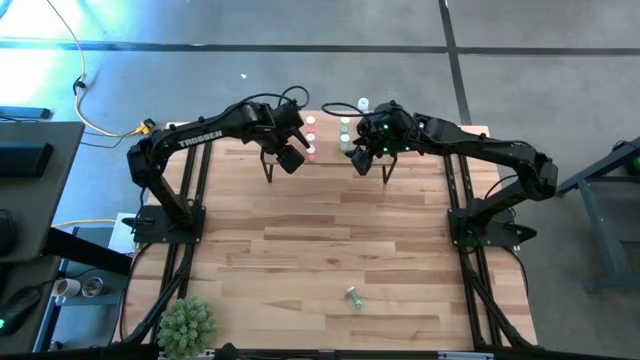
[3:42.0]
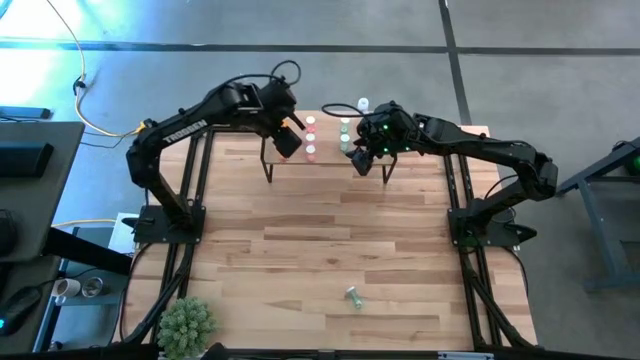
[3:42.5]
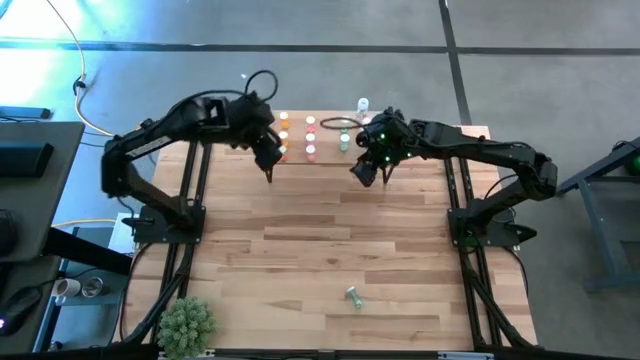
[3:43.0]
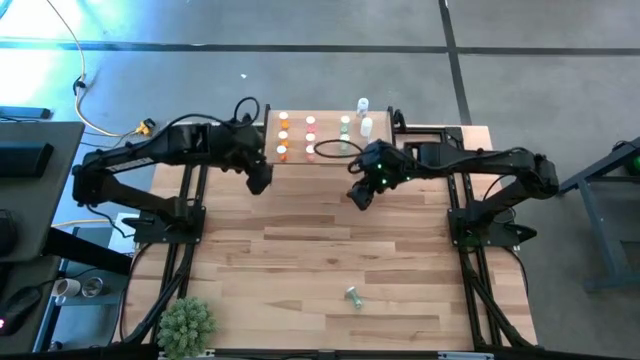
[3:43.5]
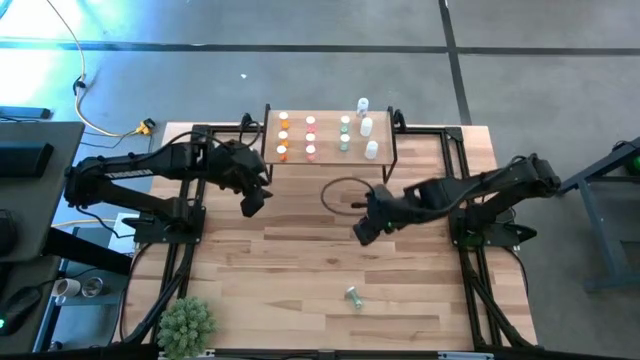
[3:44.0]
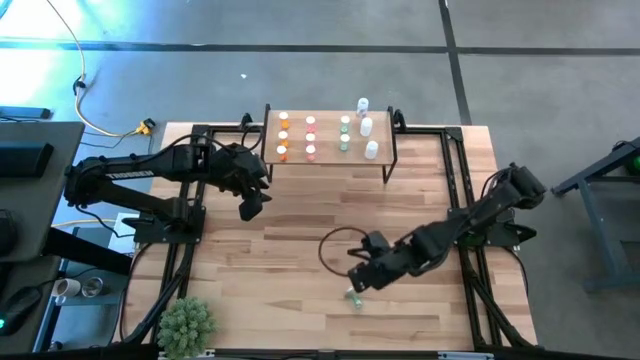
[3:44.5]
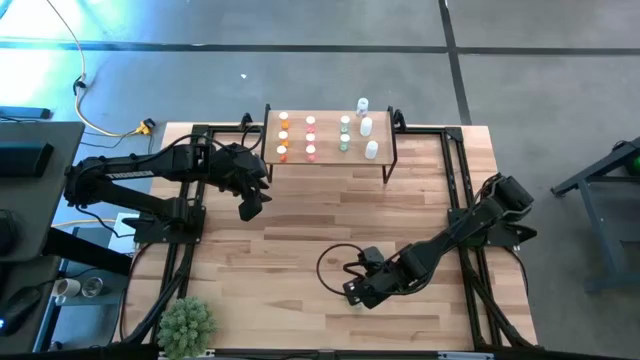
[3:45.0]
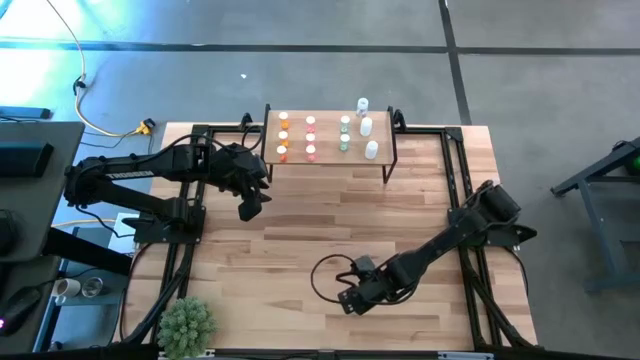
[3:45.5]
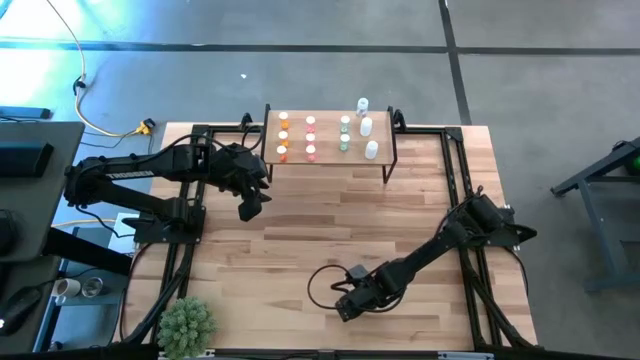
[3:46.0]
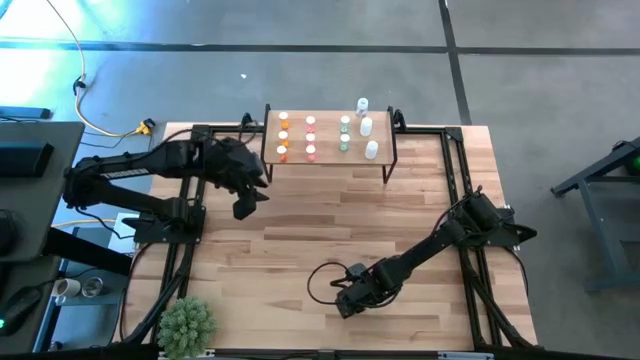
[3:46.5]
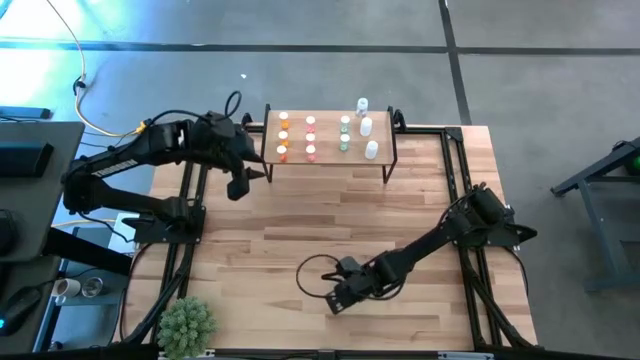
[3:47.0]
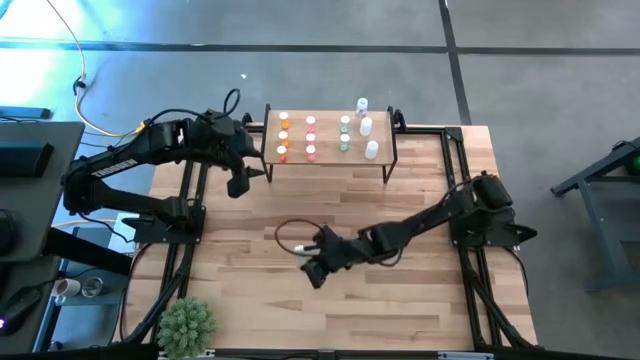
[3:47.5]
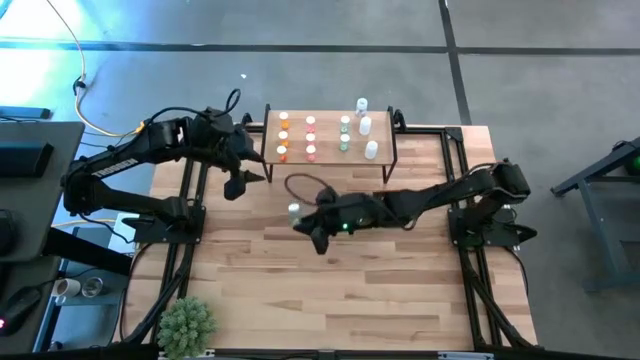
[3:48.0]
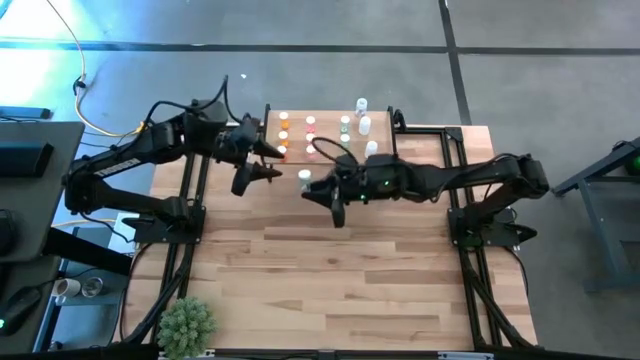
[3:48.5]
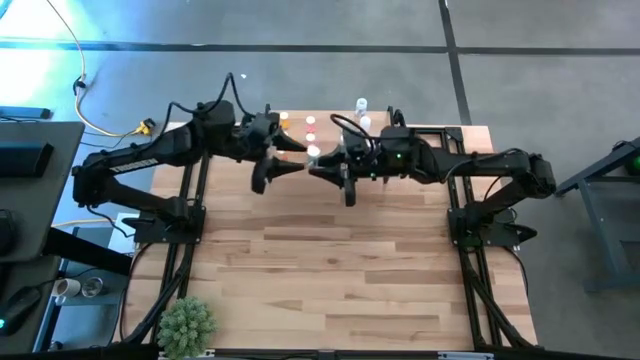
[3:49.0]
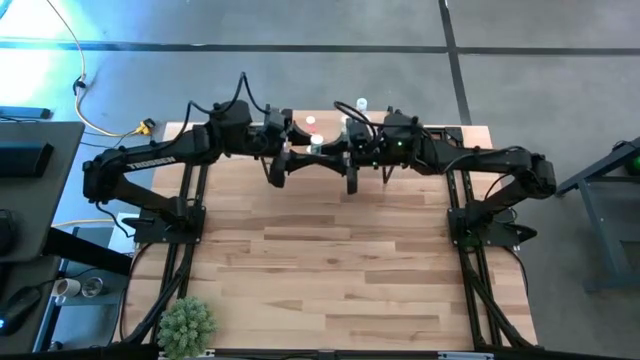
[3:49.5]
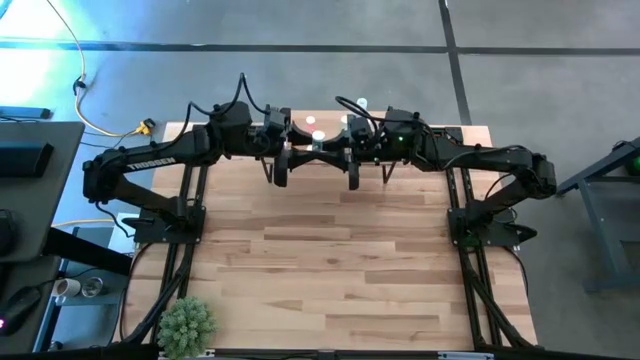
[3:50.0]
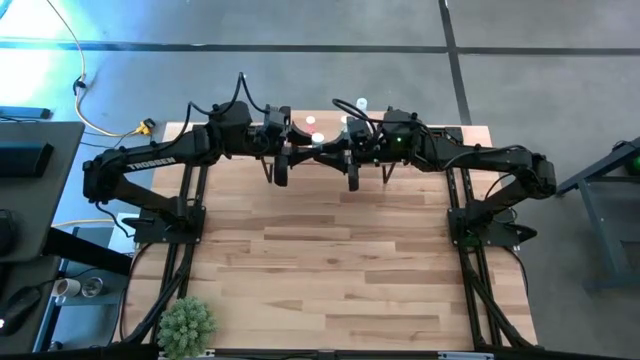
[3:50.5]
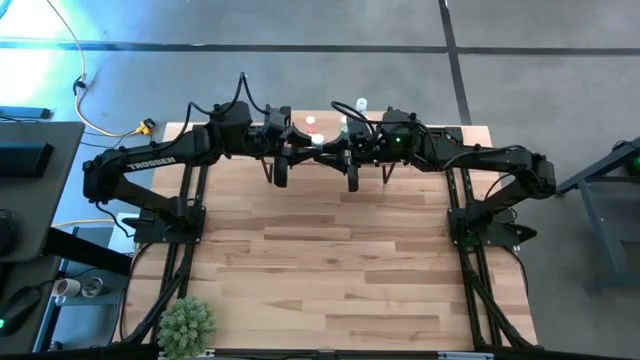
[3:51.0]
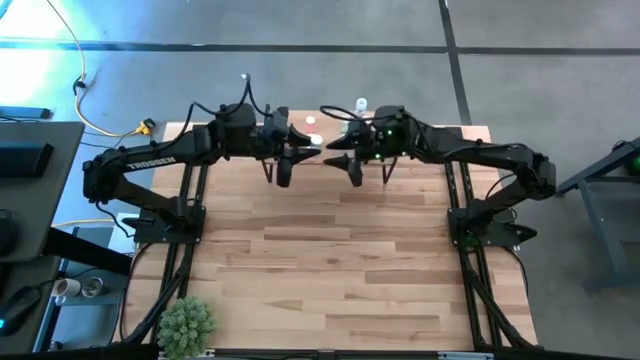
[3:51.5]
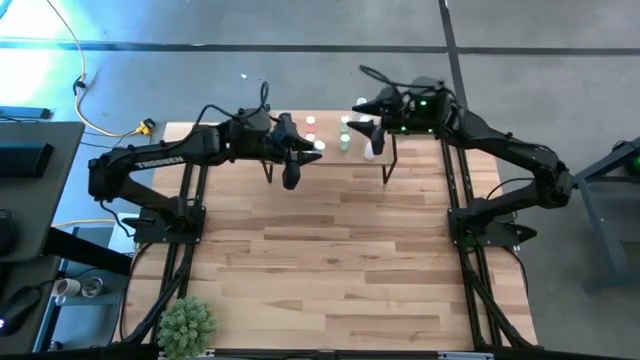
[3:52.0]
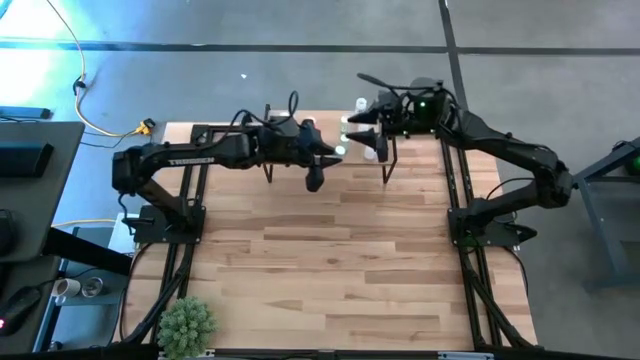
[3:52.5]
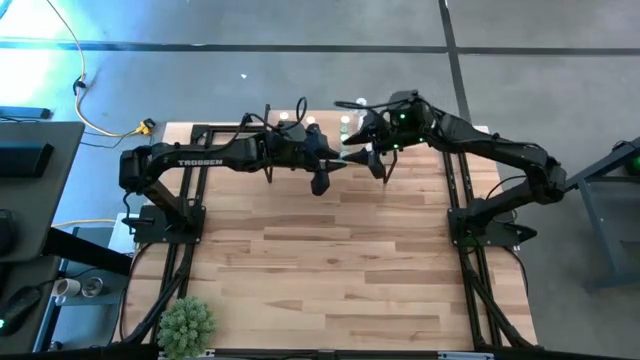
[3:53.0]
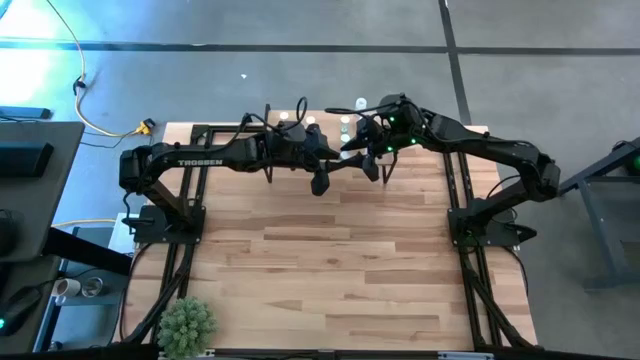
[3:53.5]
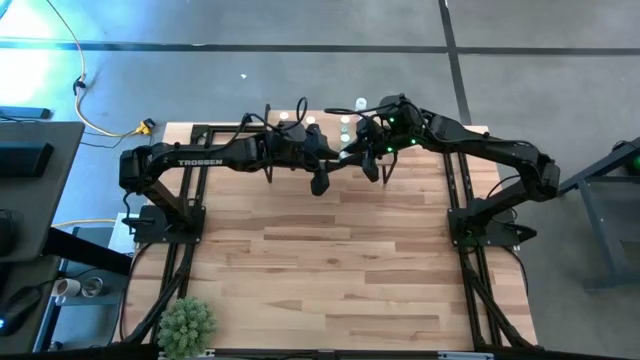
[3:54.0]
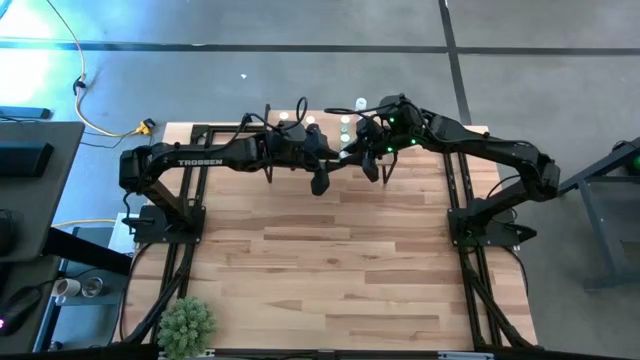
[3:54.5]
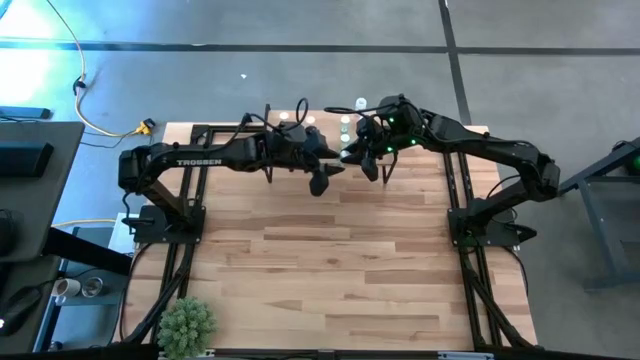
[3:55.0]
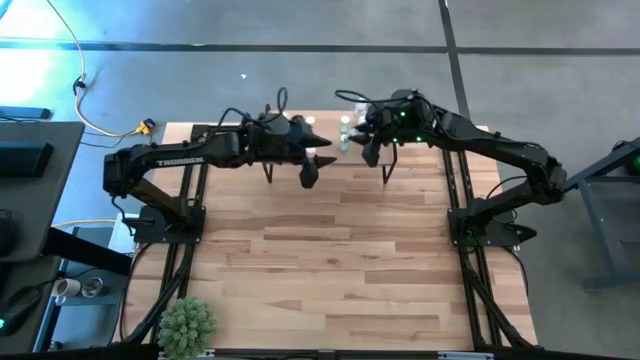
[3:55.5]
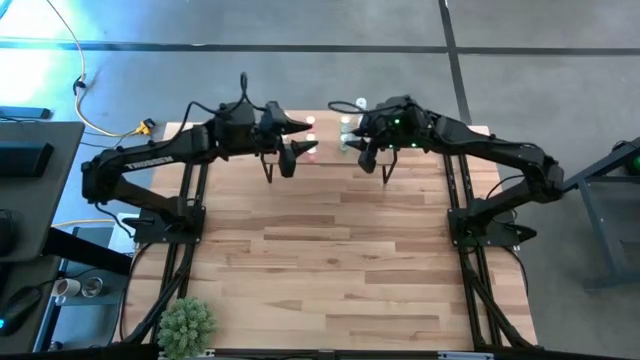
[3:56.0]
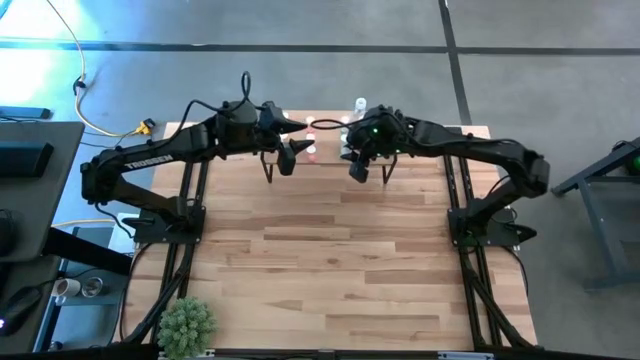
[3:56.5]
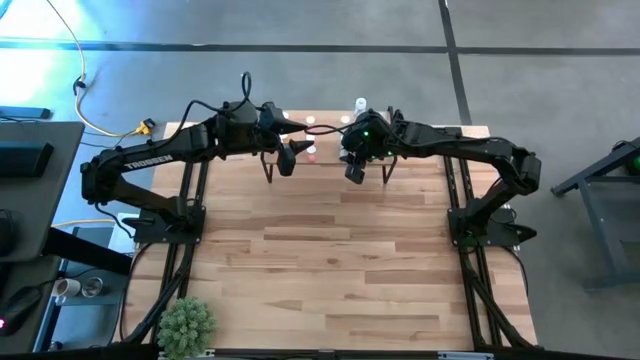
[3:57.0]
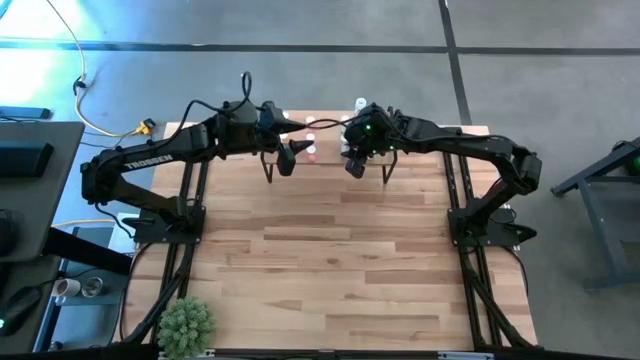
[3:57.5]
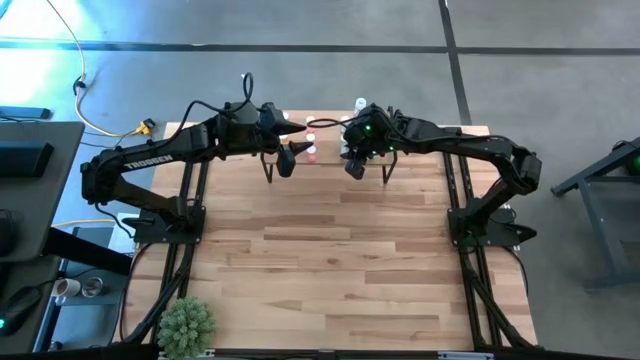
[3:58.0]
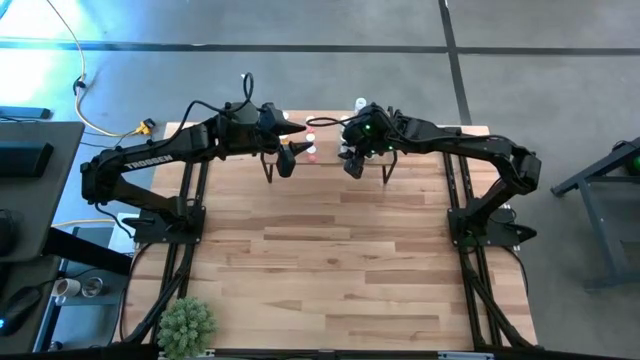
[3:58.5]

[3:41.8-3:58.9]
Task: Pick and place medicine bottles onto shelf by color
Put the blue pill bottle on the shelf aligned with the blue pill bottle

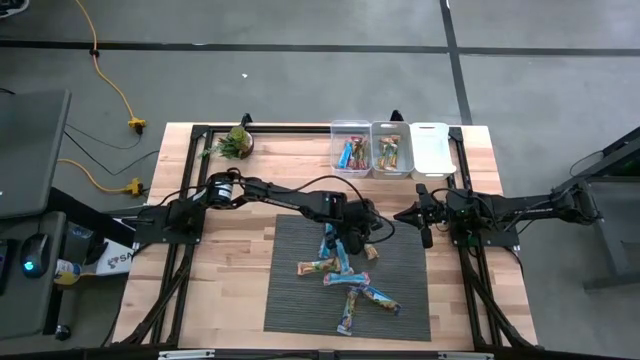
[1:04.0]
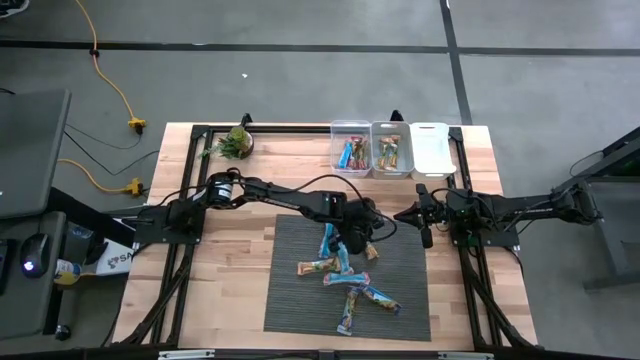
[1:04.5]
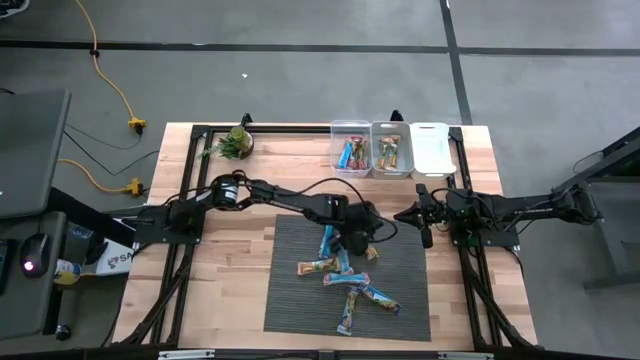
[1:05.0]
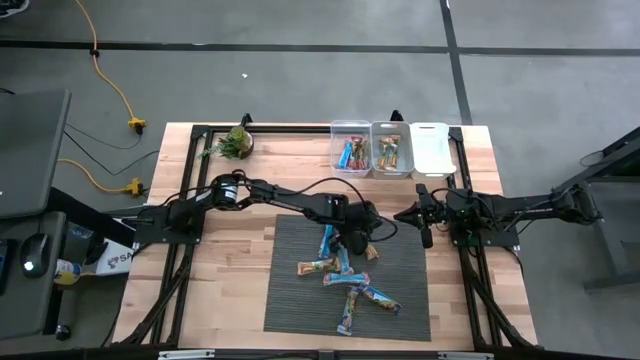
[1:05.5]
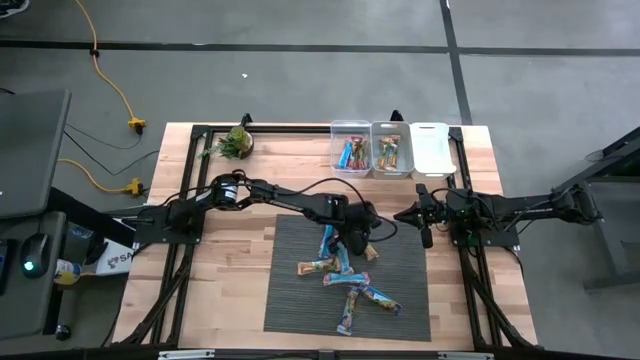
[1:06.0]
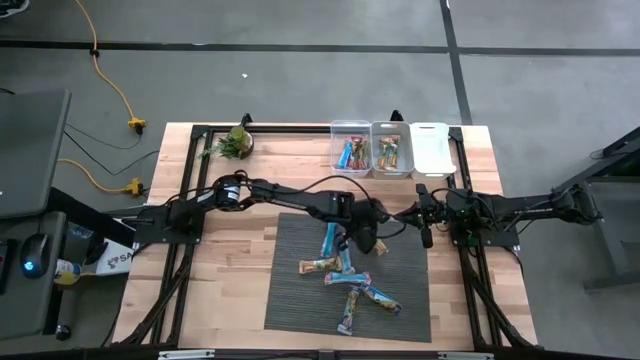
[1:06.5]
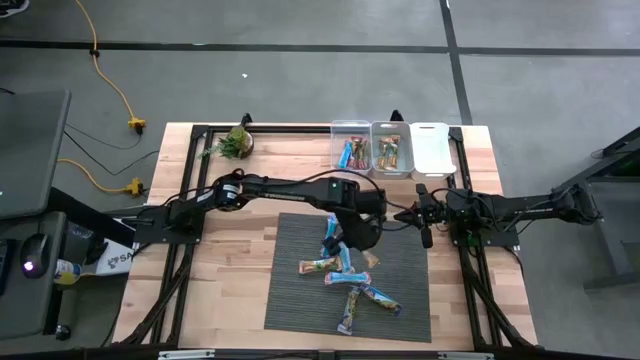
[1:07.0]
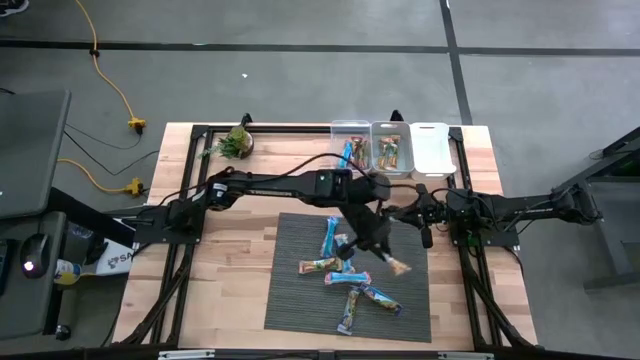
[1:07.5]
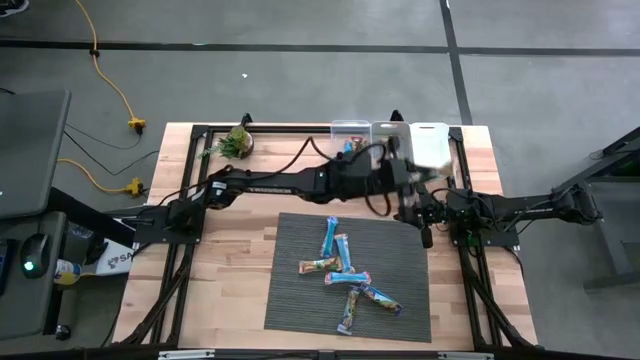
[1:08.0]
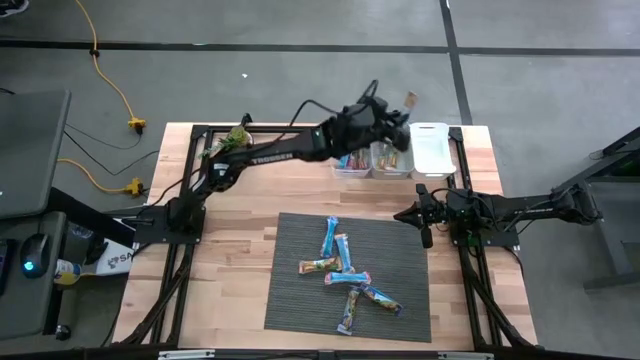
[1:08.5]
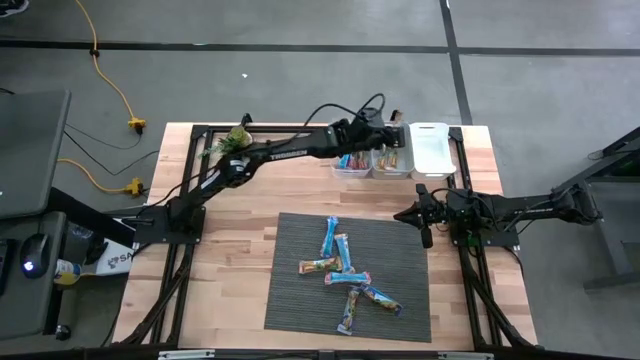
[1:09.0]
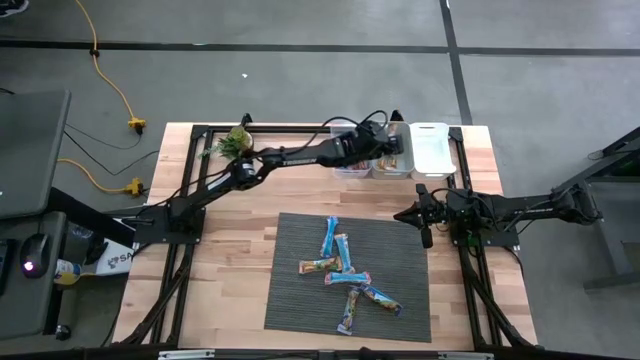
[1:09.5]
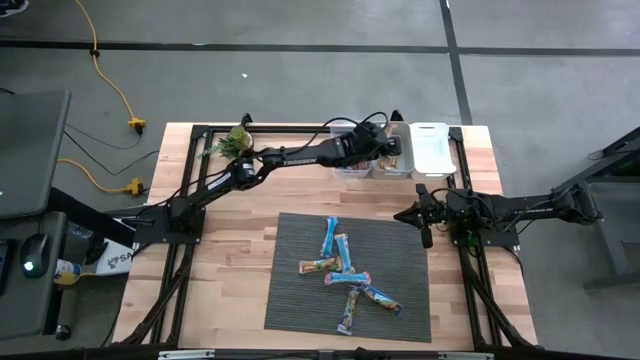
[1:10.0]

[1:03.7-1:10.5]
Task: Pick and place Granola Bars by type
Put the orange granola bar into the gray bin
